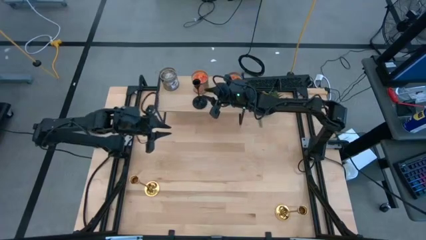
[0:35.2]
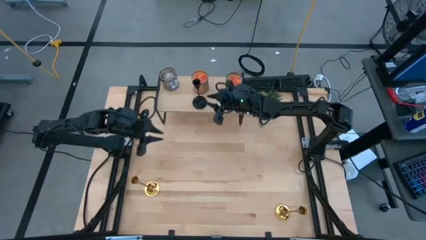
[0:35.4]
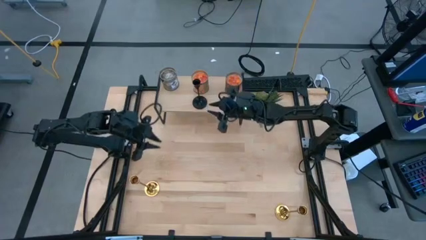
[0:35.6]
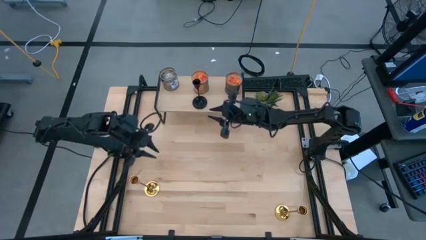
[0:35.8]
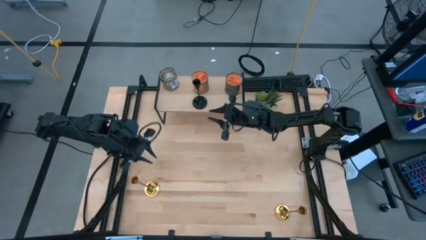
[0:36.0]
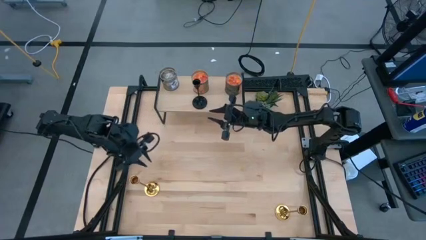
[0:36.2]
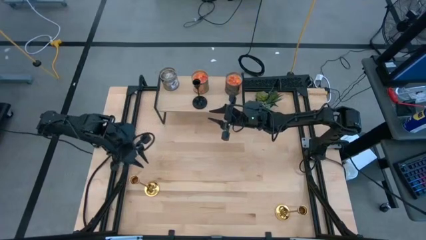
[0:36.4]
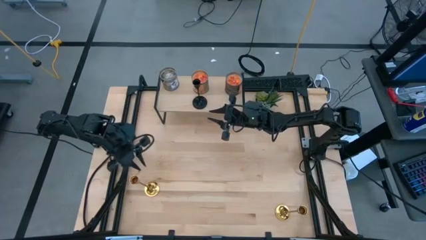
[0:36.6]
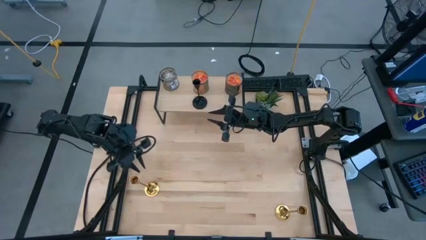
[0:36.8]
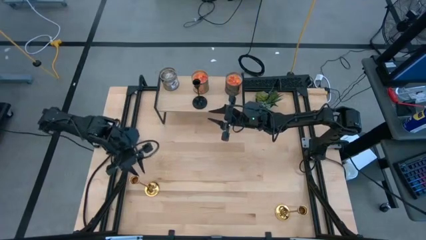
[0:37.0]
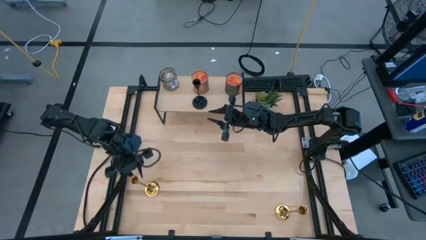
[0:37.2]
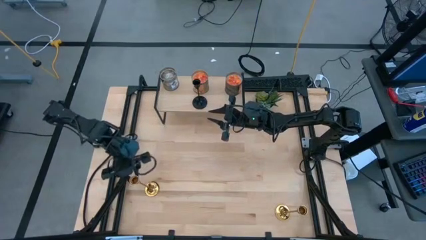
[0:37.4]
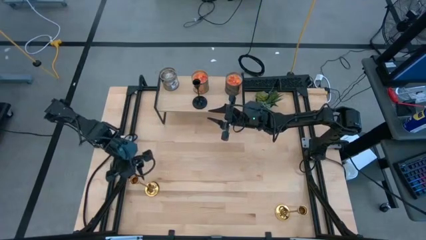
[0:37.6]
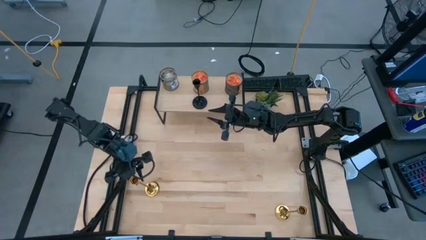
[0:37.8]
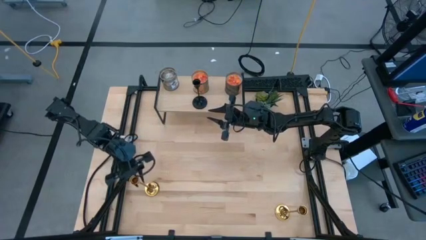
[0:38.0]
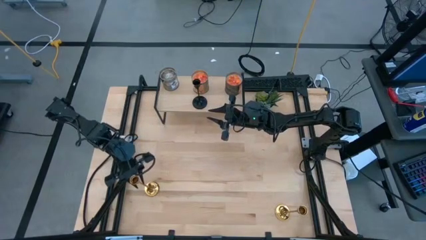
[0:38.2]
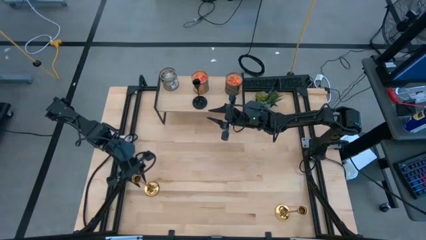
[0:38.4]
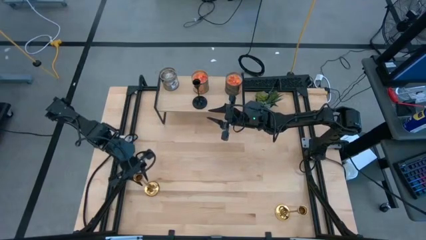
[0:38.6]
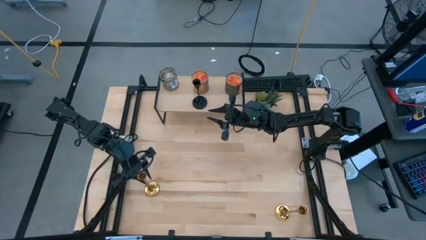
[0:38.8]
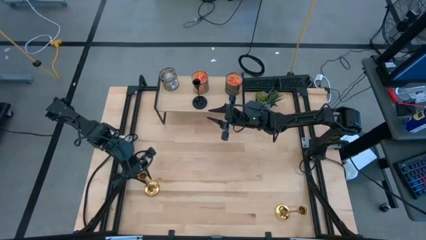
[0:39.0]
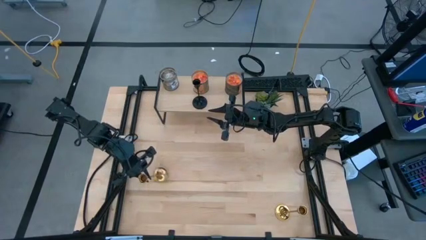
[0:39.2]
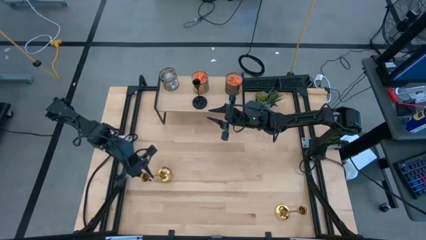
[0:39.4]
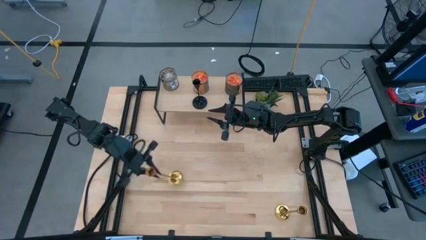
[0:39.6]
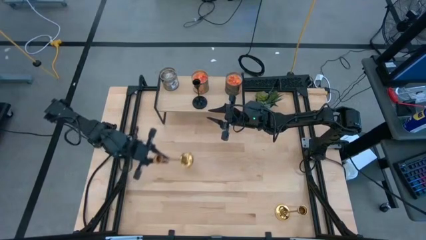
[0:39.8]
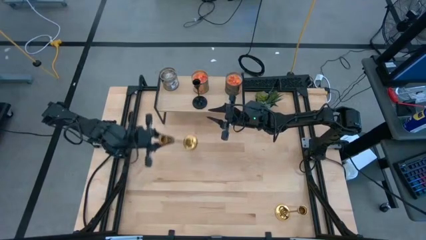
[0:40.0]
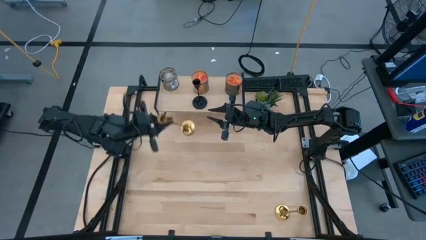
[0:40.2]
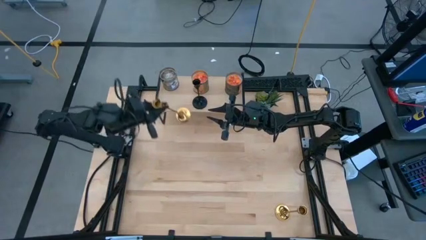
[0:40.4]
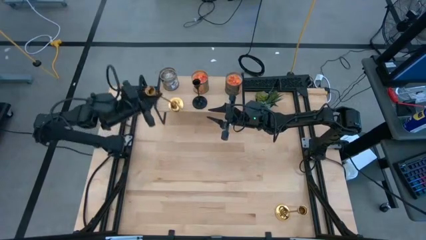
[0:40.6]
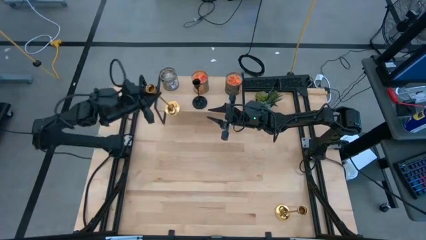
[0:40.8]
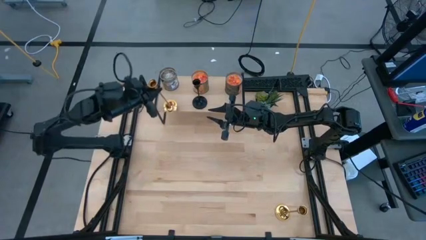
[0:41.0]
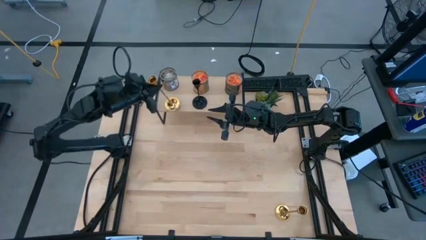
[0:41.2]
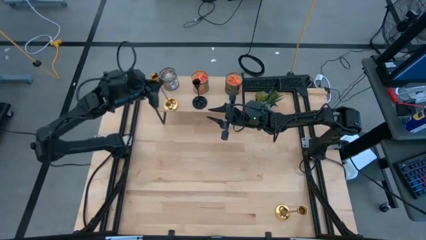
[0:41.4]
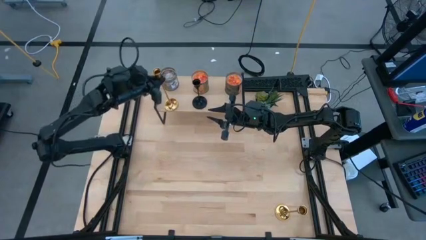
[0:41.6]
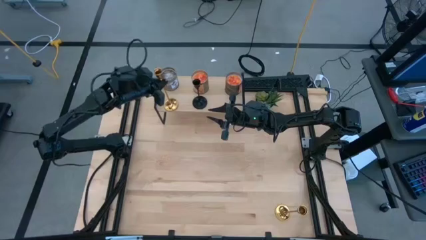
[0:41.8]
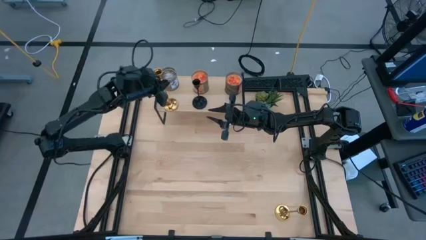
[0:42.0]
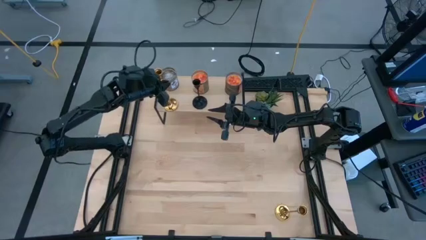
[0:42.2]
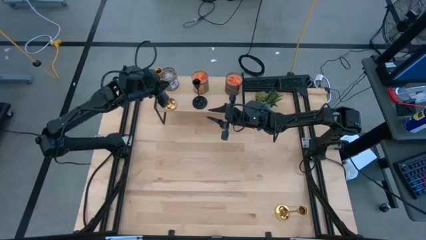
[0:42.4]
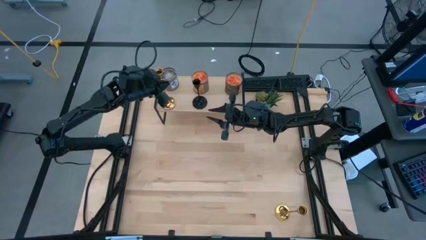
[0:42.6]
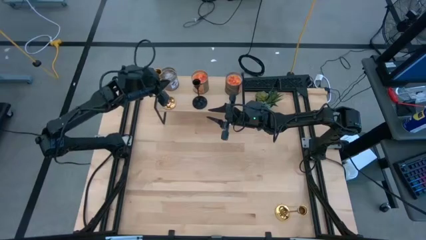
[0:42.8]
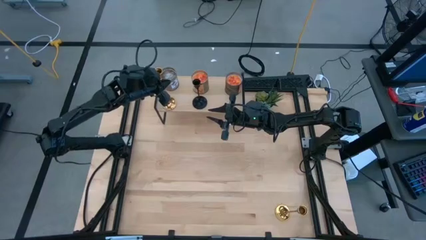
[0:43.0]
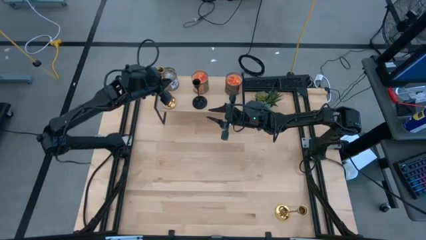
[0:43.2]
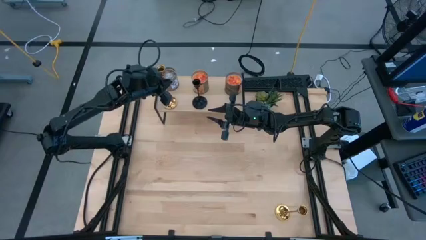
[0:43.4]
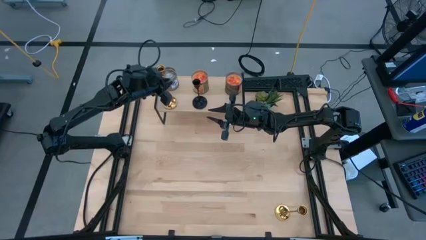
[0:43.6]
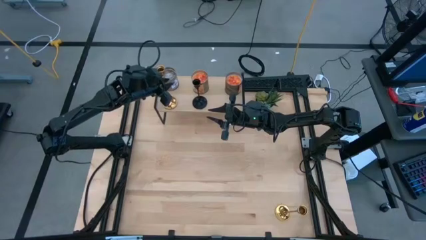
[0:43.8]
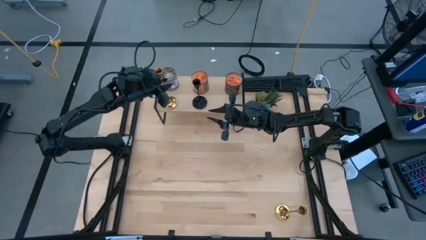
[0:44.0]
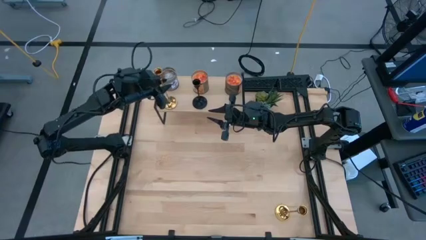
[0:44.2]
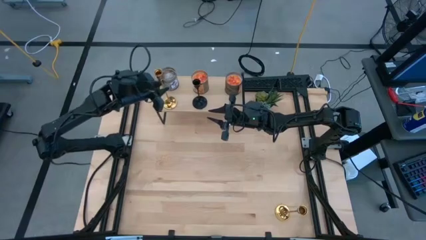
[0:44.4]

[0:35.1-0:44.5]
Task: Pick & Place candle stick holders
Put the left golden candle holder on the shelf

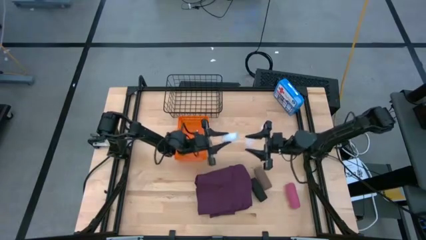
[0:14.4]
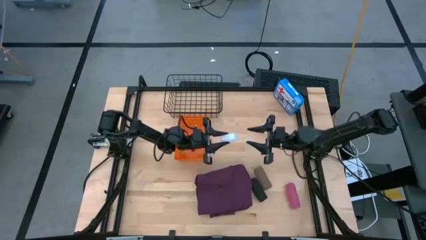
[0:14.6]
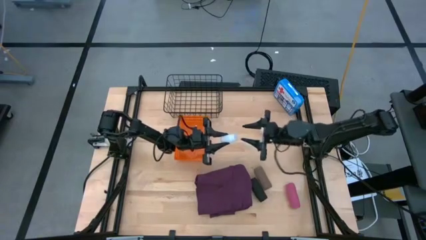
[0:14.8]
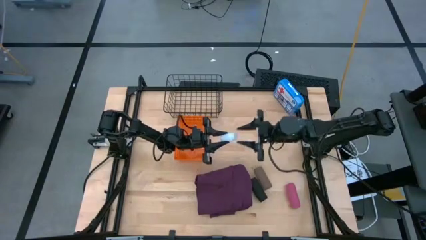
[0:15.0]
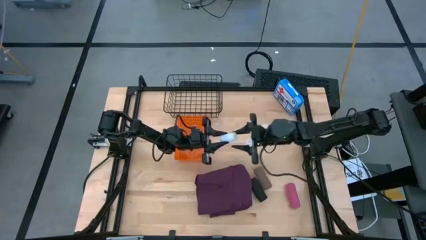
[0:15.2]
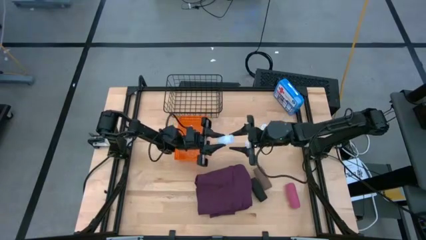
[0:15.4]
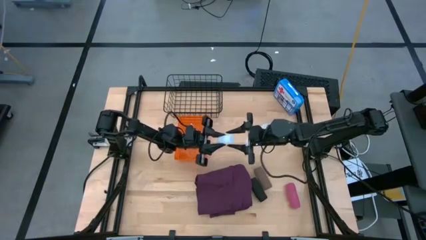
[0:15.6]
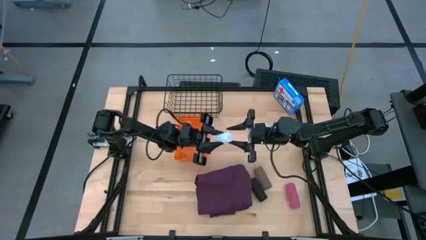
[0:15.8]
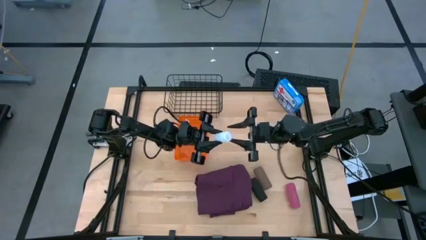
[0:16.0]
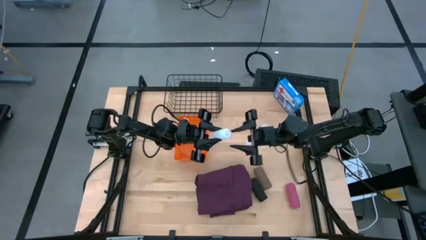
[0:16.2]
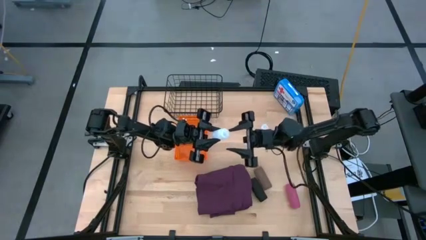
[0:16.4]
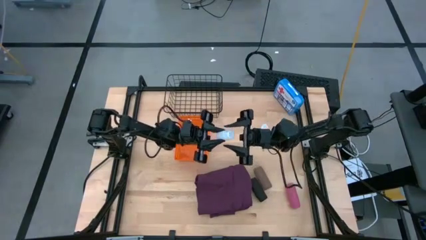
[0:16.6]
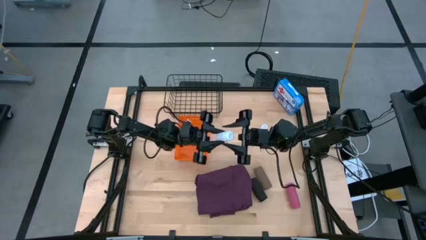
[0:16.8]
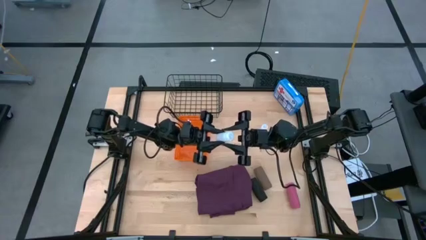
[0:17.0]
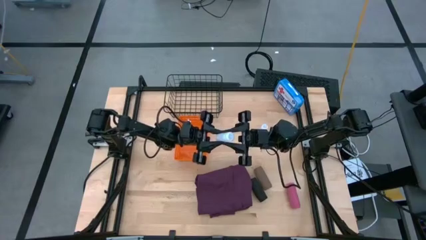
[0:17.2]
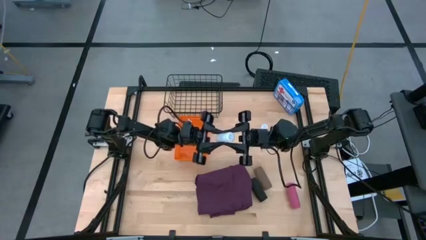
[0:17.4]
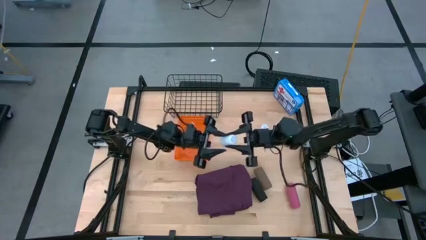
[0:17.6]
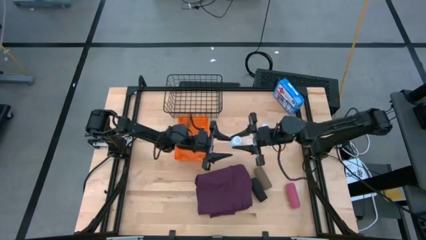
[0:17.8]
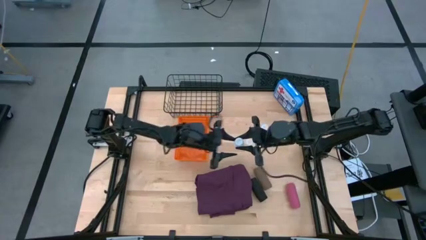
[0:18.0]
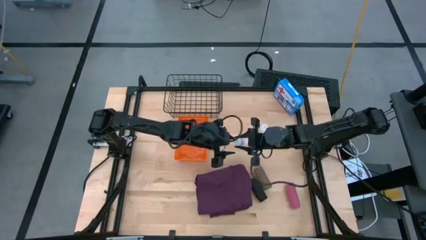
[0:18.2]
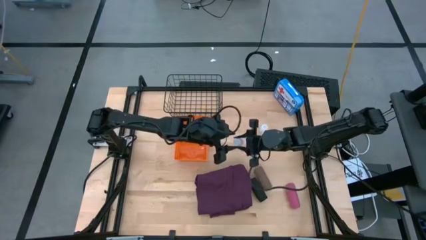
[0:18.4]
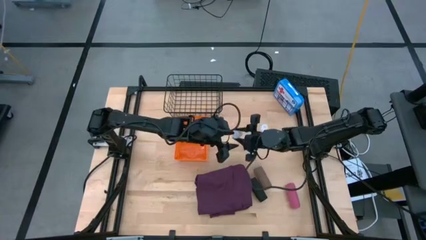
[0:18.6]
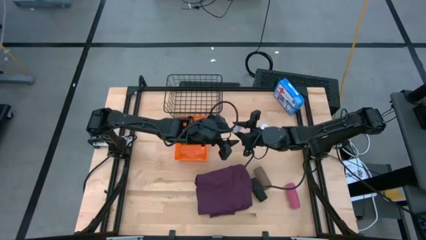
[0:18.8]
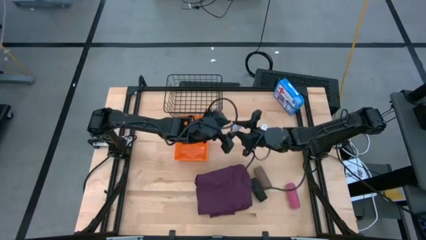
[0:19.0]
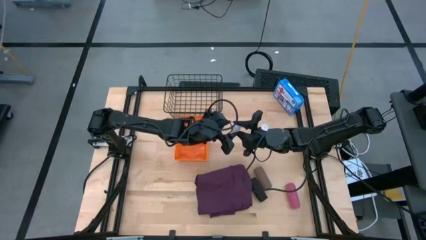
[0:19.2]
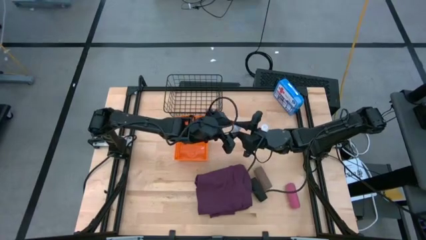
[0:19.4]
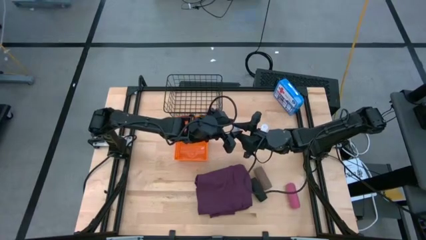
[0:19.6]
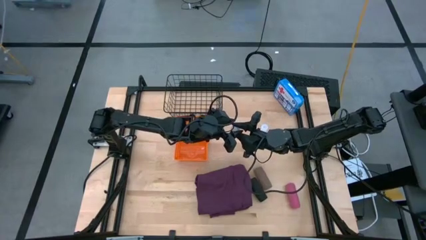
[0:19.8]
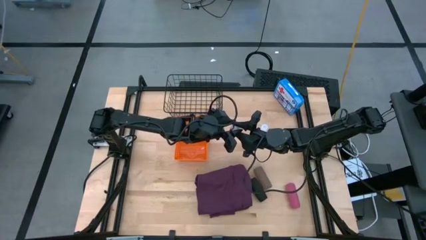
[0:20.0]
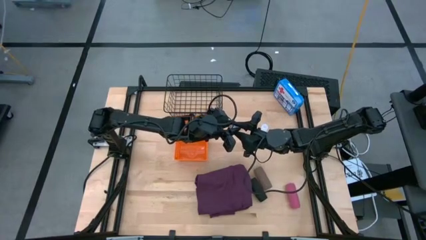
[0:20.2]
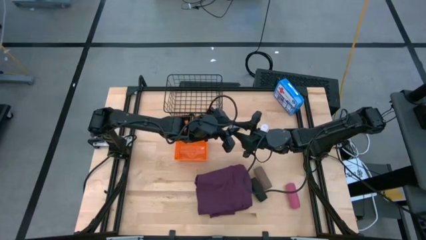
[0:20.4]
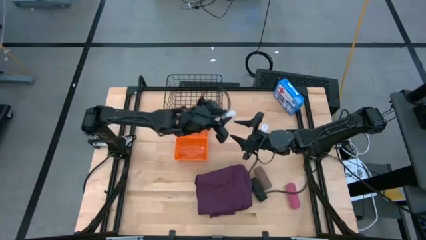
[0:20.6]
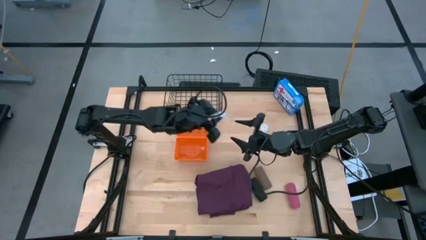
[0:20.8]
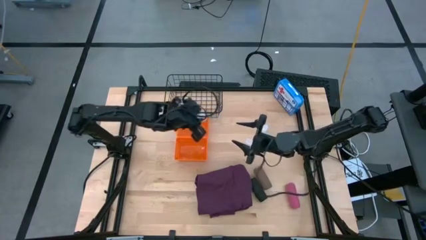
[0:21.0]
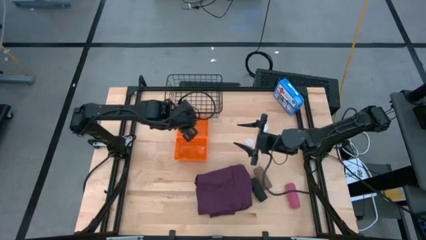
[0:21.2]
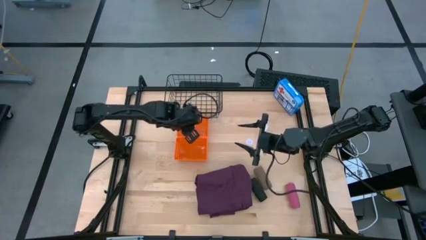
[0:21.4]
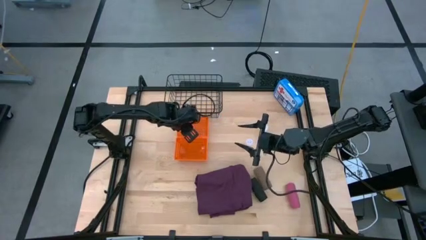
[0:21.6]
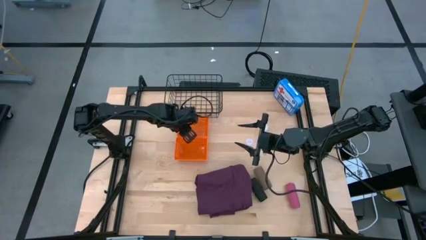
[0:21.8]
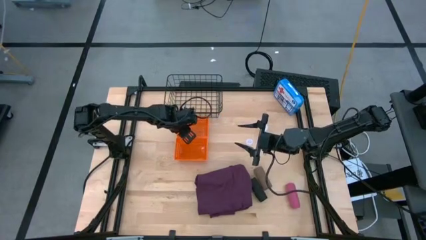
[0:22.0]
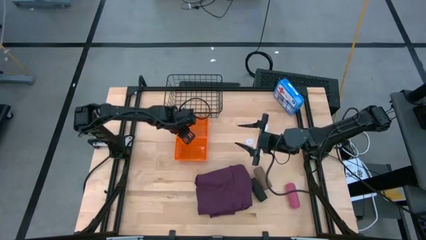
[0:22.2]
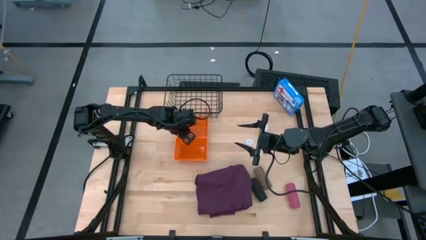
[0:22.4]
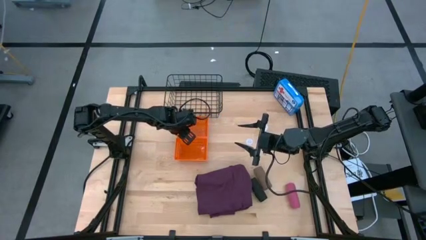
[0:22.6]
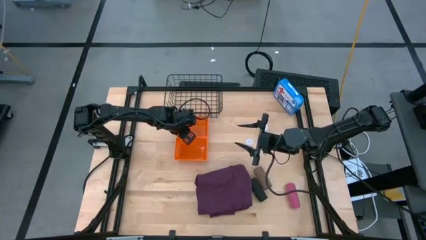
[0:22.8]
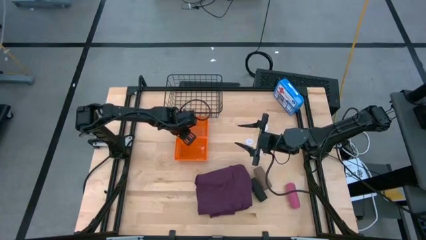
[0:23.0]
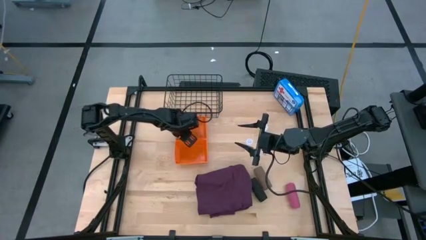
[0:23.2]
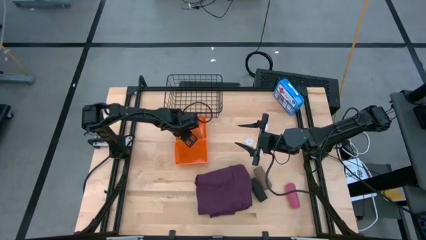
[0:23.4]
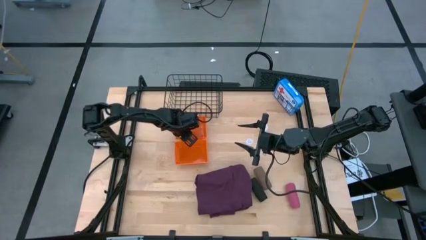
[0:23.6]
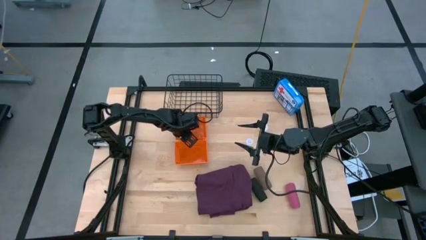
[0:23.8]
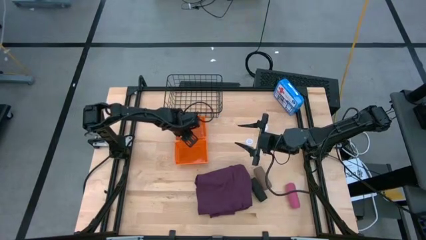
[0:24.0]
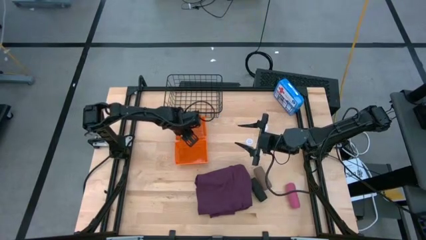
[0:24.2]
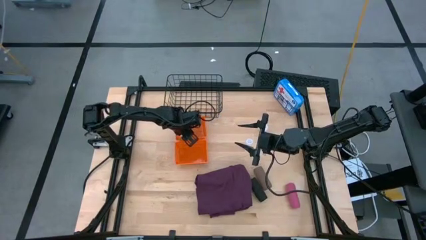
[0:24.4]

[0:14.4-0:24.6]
Task: Pick & place medical supplies in basket/bin
Put the bottom white pill bottle into the top orange bin
